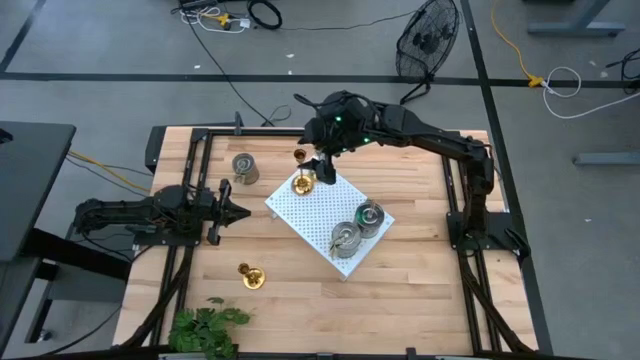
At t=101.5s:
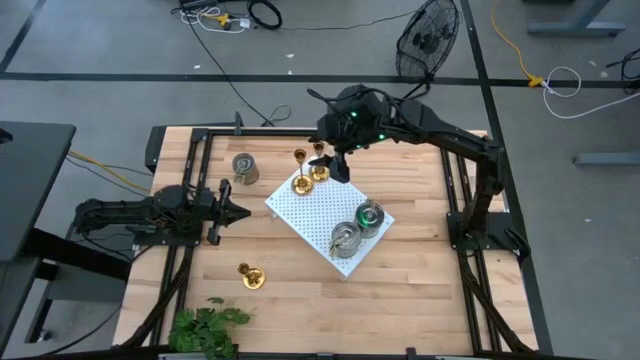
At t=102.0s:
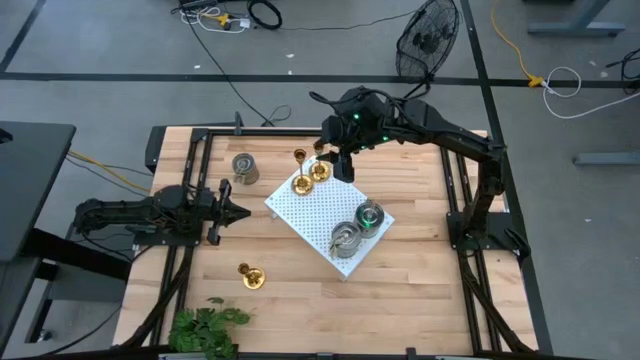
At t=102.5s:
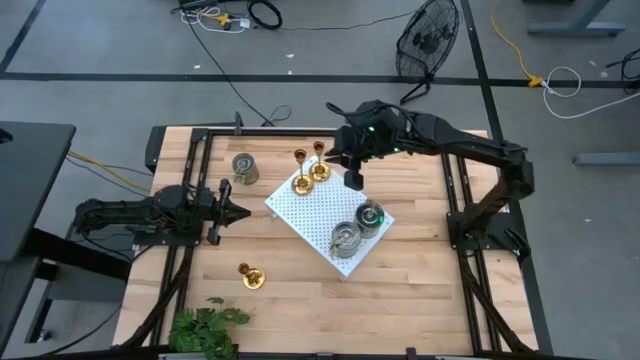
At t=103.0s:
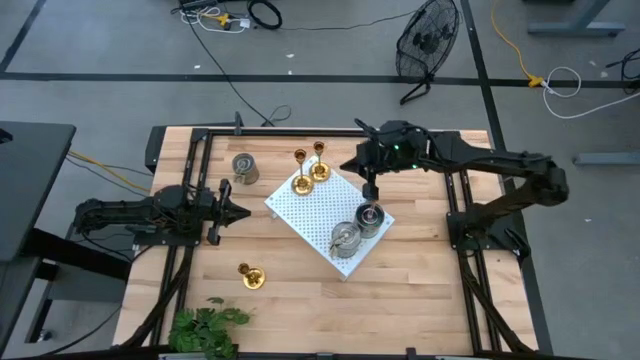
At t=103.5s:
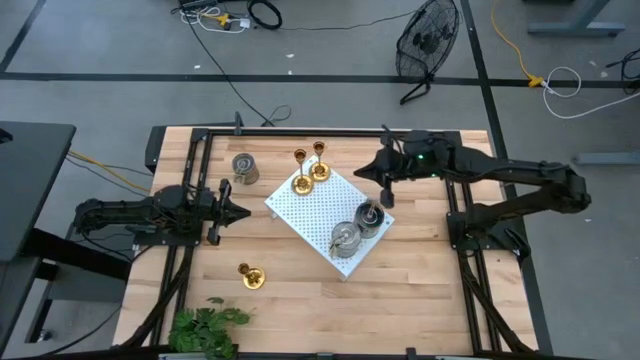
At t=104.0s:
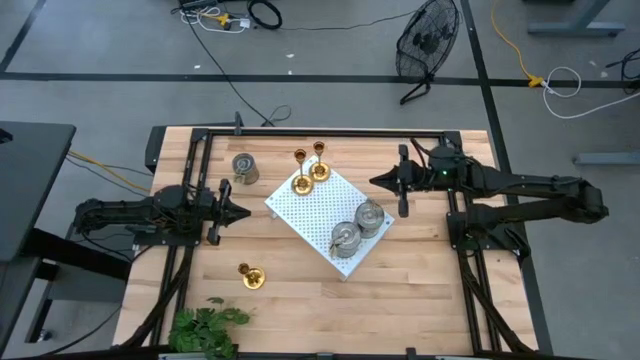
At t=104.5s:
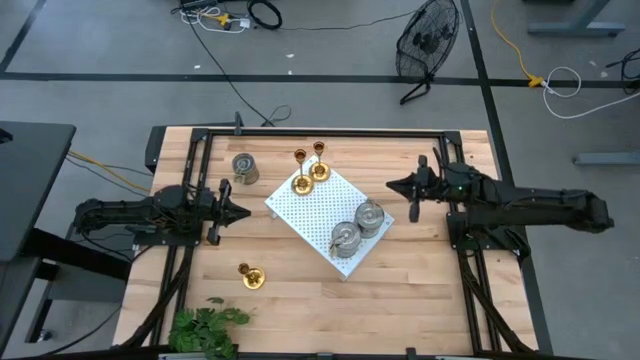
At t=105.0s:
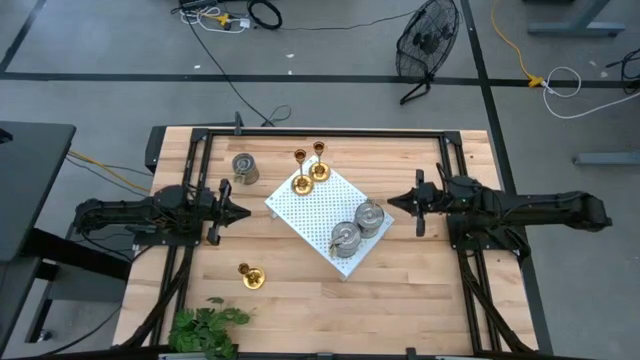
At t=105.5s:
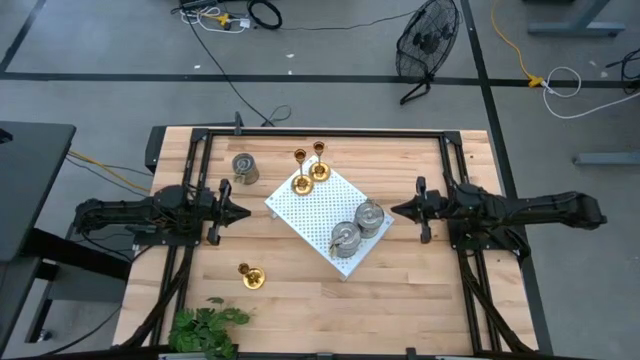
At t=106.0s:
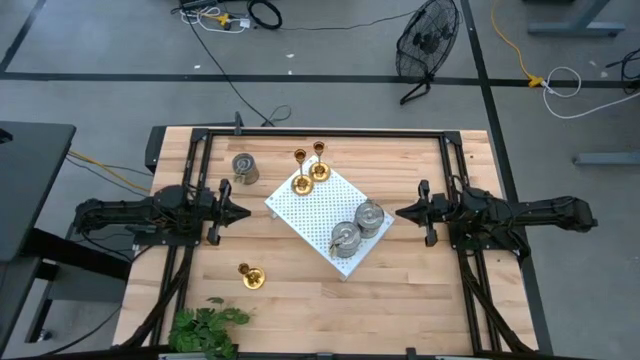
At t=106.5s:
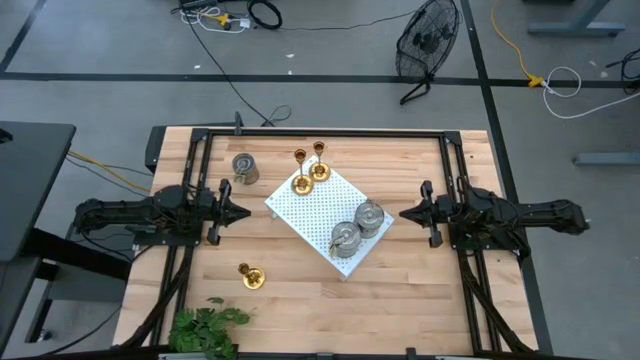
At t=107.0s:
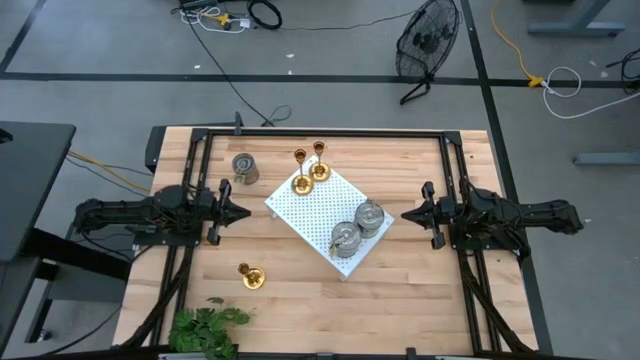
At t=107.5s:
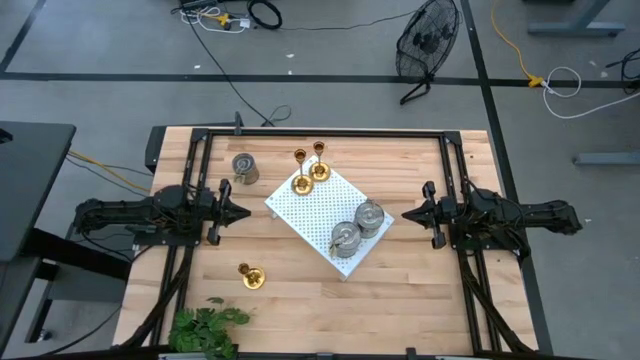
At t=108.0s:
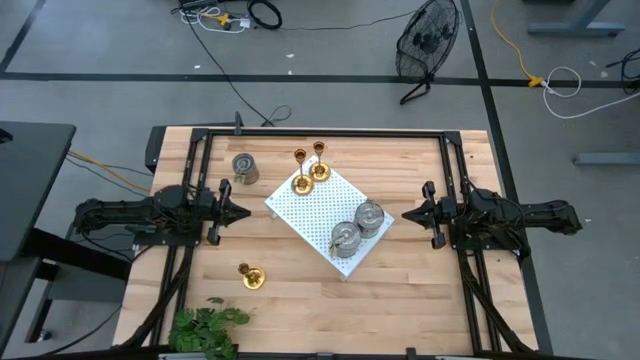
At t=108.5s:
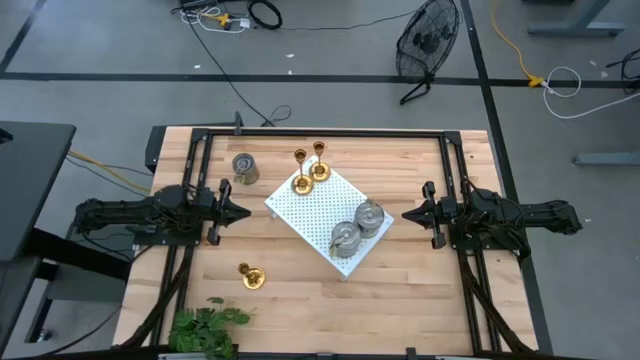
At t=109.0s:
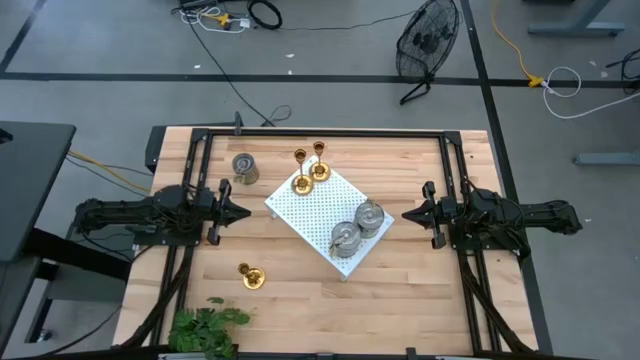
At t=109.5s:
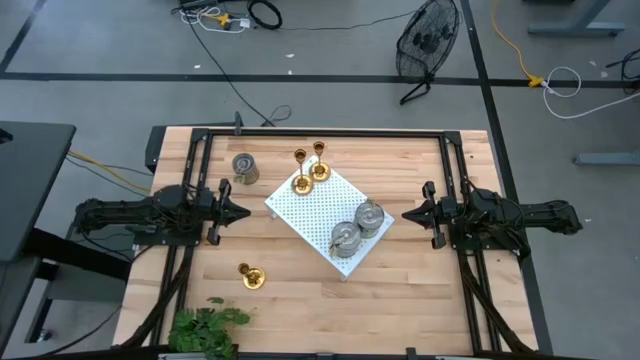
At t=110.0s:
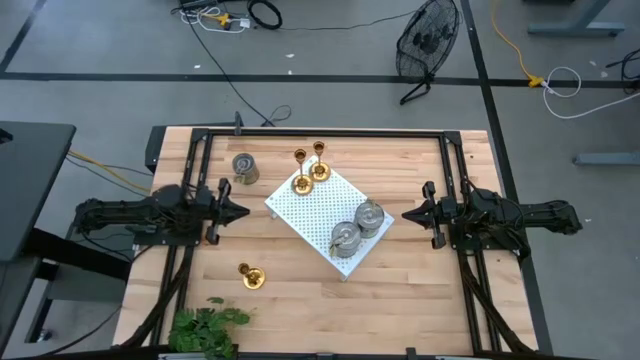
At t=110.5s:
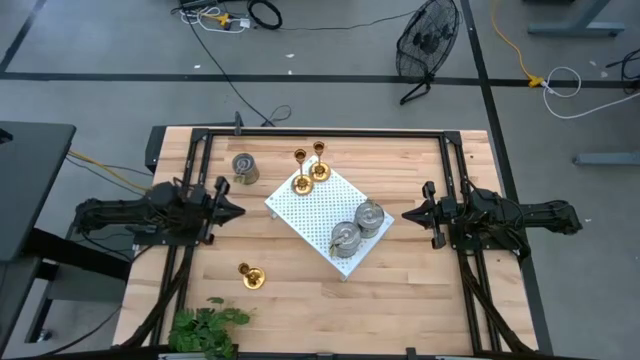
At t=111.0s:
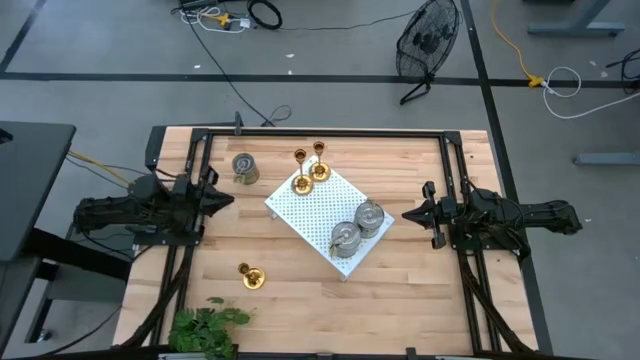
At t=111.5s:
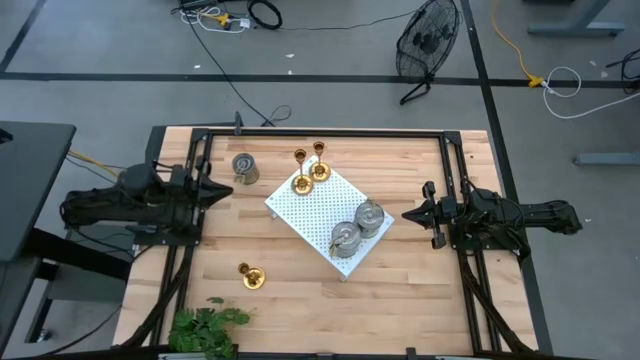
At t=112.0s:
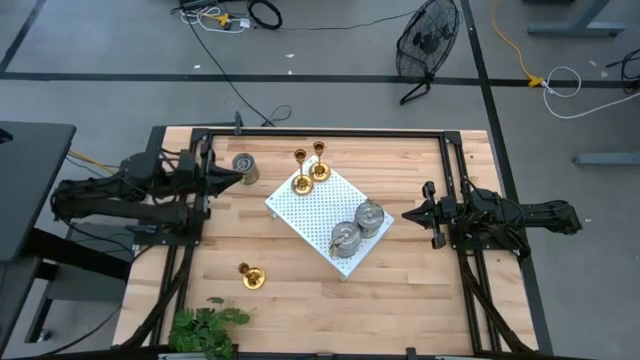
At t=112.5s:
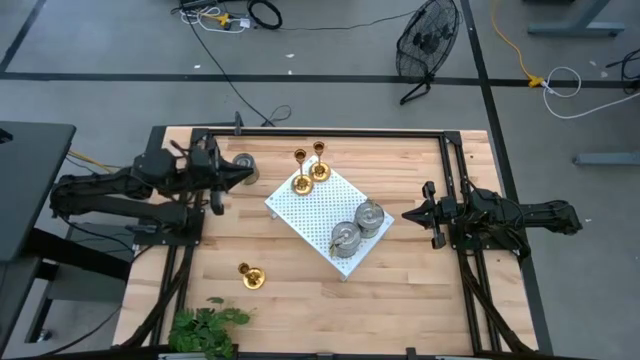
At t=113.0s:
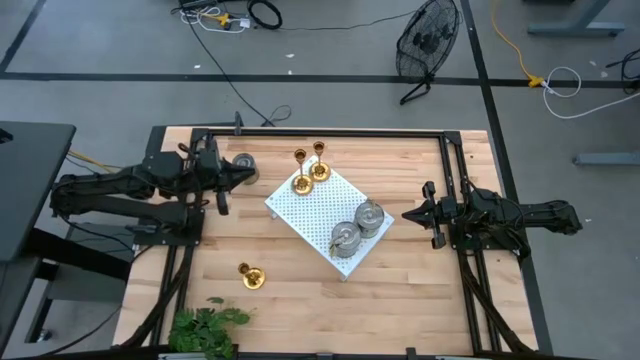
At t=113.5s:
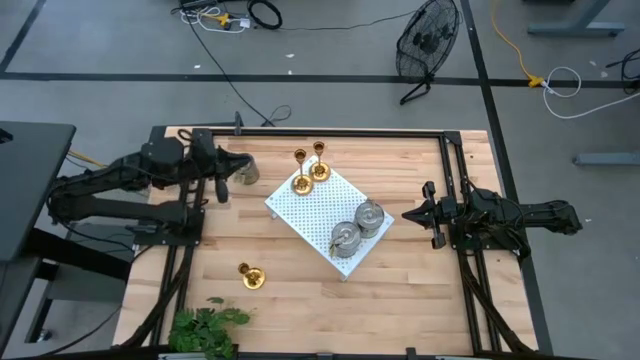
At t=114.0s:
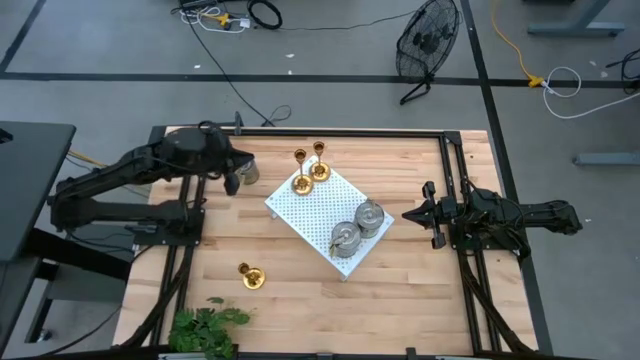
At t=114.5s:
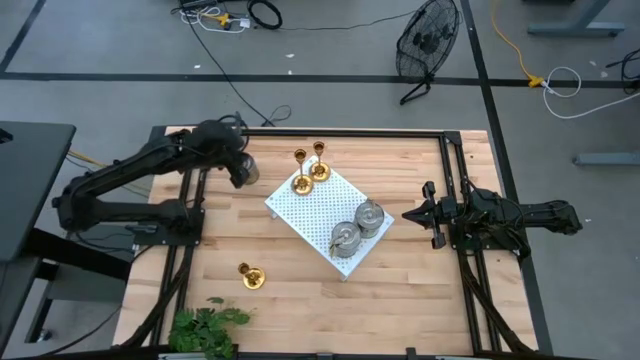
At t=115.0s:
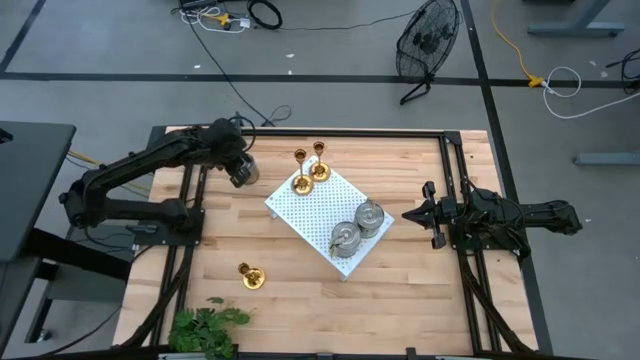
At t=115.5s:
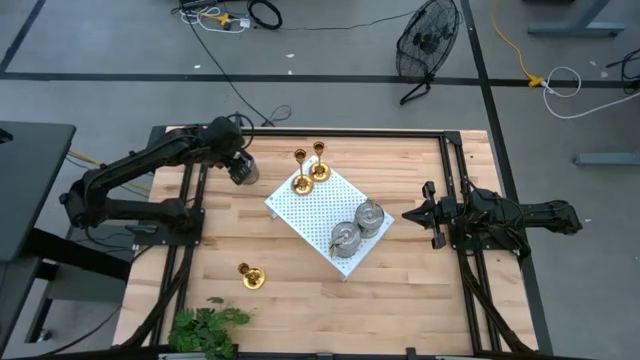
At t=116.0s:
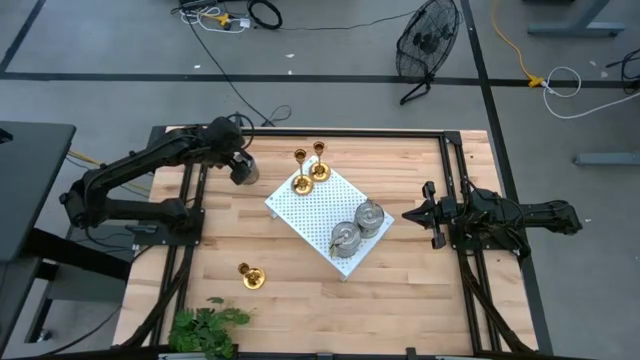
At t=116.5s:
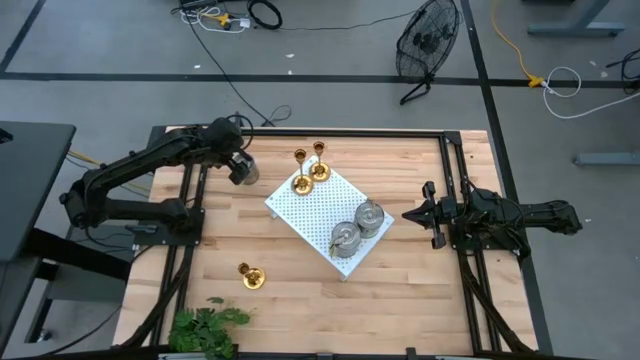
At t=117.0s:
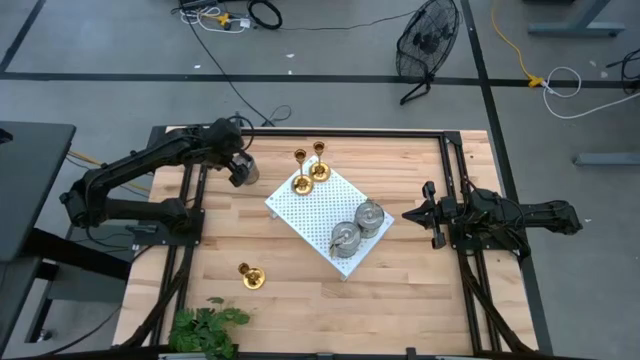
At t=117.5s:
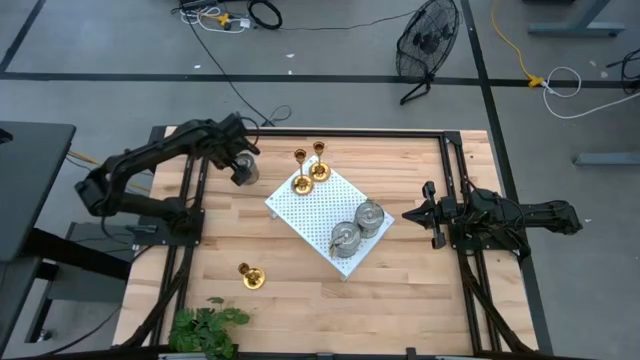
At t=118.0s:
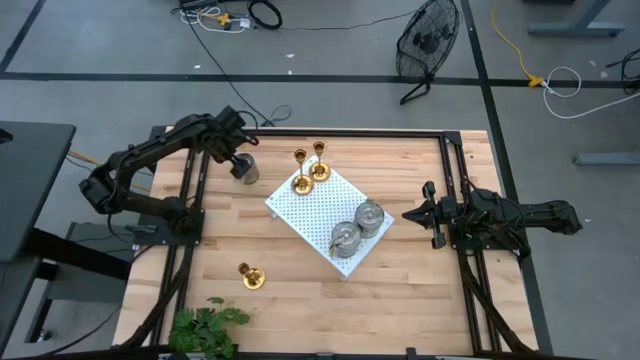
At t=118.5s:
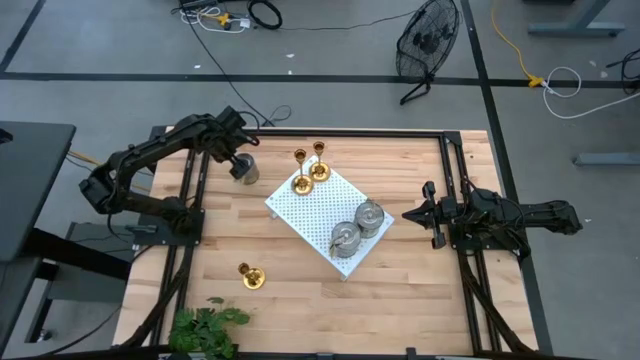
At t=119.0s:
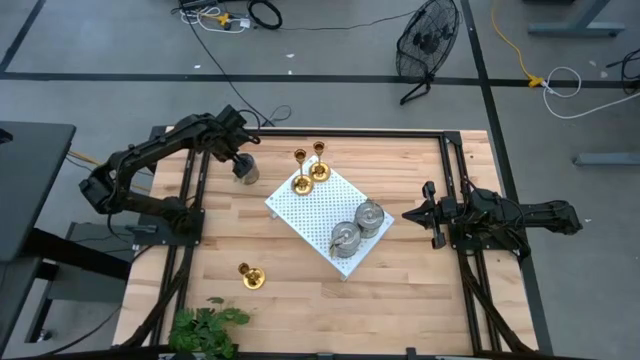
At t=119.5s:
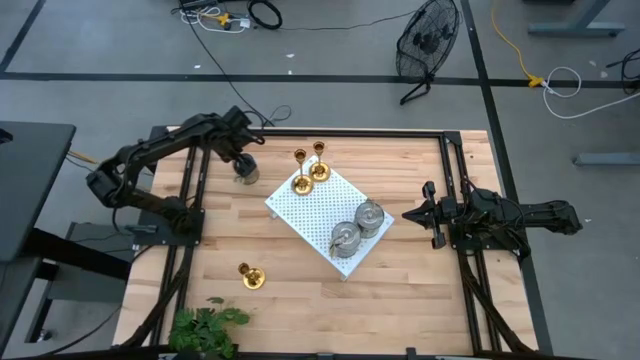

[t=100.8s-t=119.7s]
Task: Pick & Place candle stick holders
Put the scented candle on the shelf

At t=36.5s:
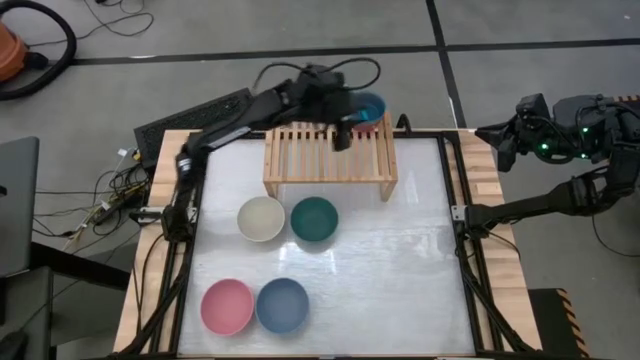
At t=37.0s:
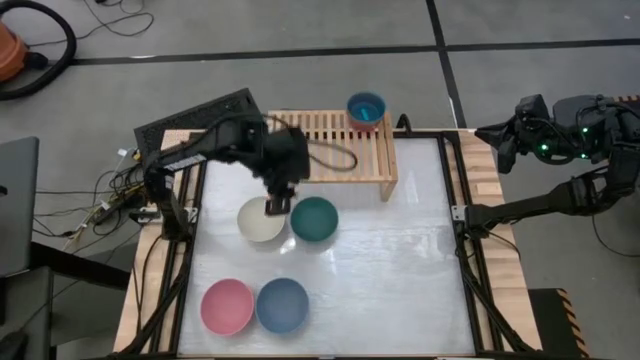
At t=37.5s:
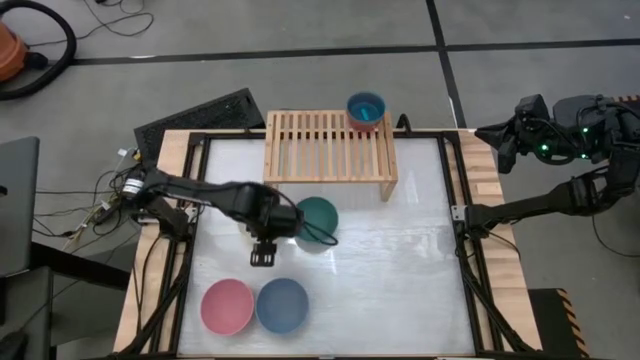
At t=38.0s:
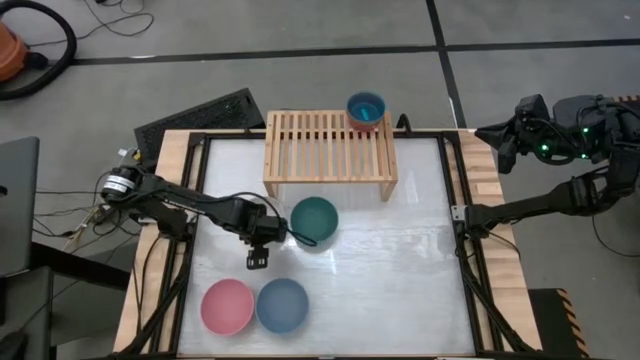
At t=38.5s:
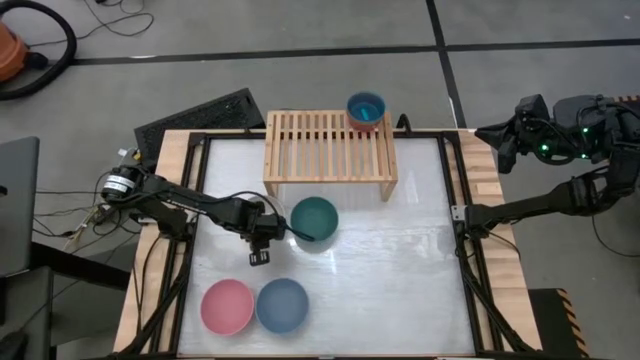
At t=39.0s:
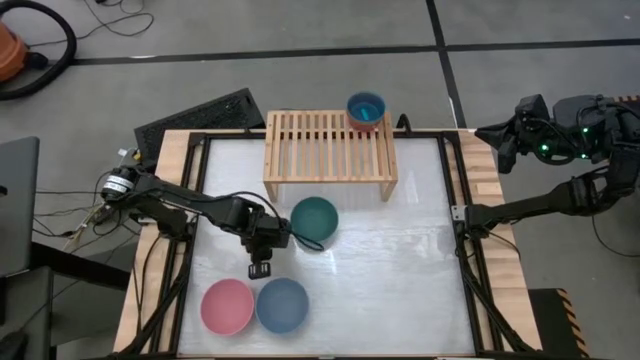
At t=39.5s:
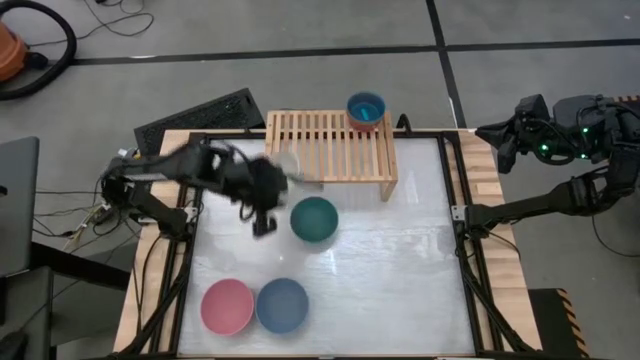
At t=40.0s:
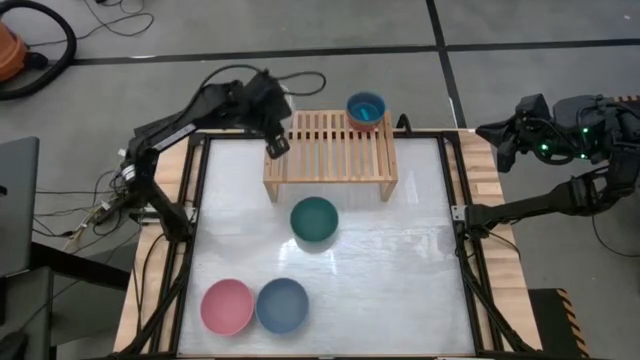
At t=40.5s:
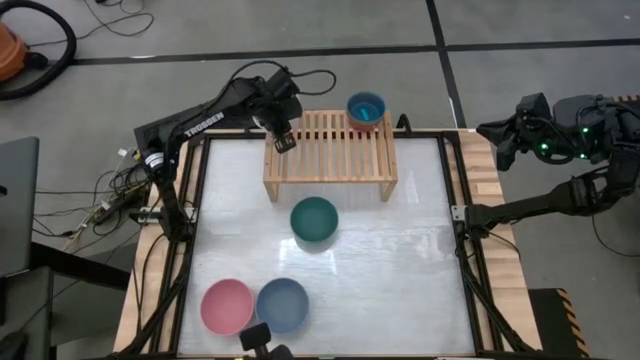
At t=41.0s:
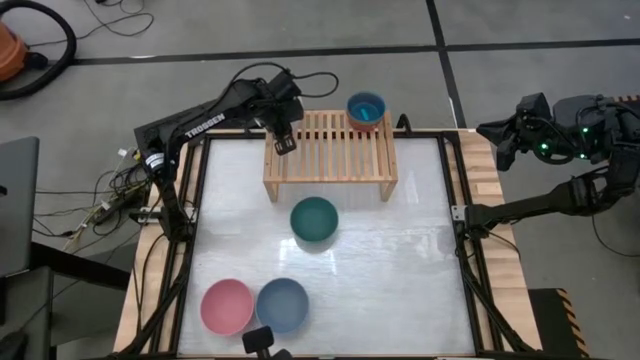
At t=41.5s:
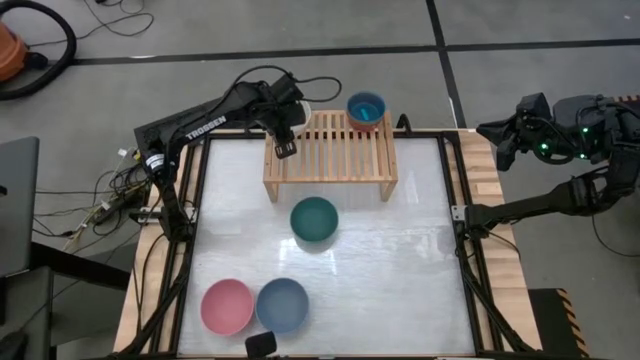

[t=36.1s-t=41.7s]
Task: Place and stack bowls onto a shelf
Put the large white bowl on the shelf
